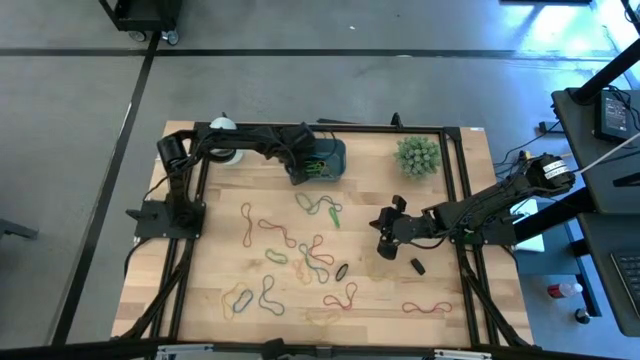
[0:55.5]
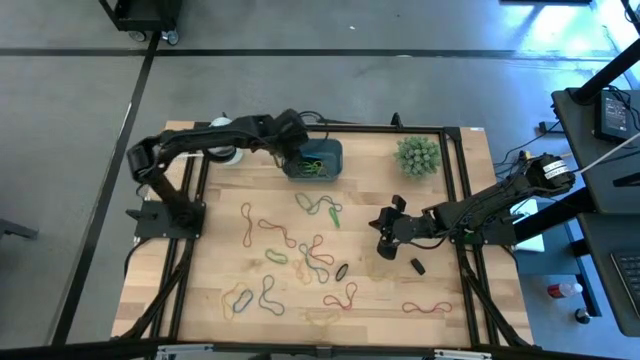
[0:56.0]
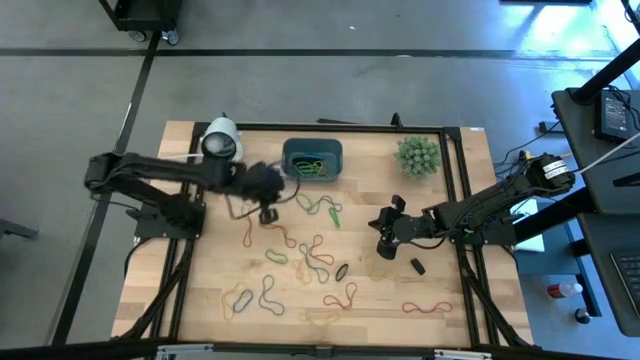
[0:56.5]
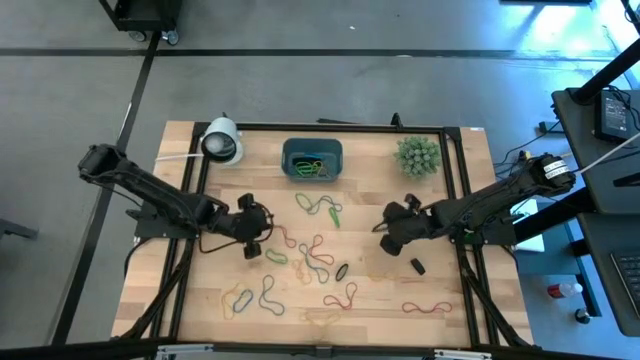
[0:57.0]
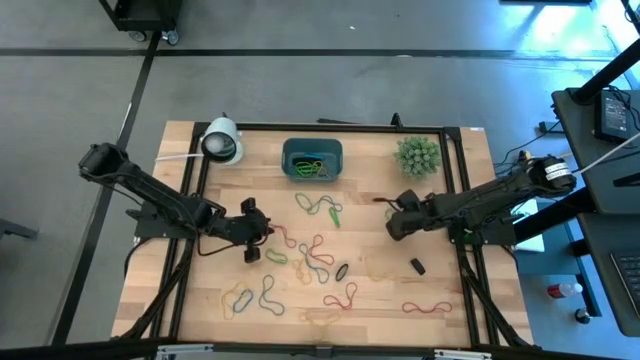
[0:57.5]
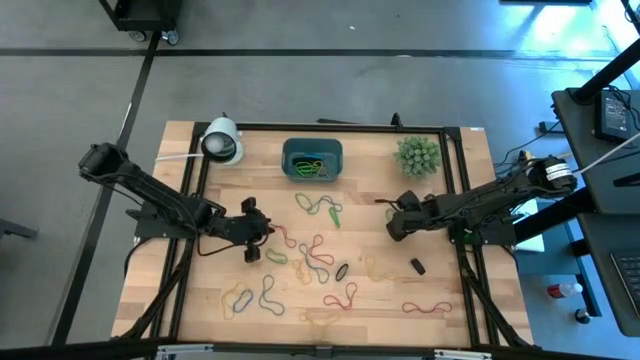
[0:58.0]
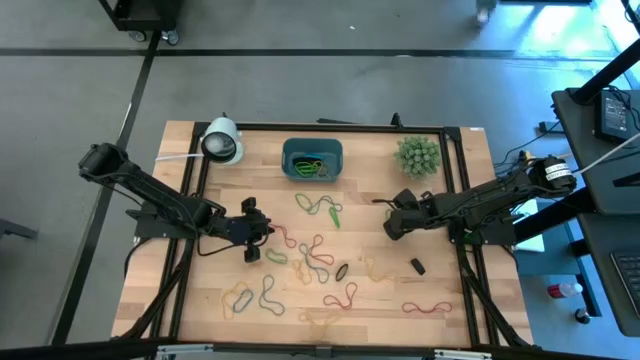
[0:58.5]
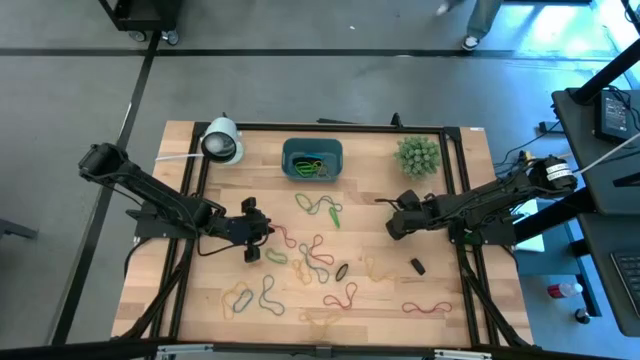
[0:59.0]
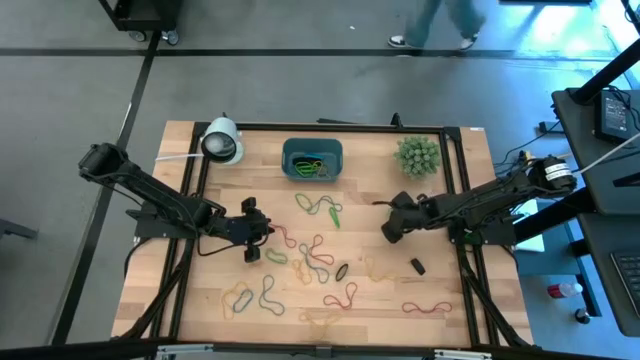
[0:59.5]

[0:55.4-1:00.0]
Task: Pick and place rubber bands into bin
Put the green rubber band into the blue bin

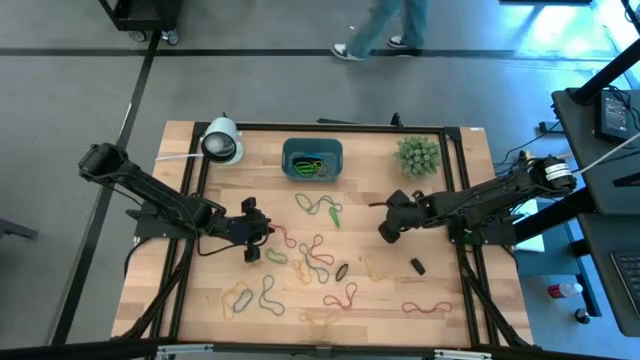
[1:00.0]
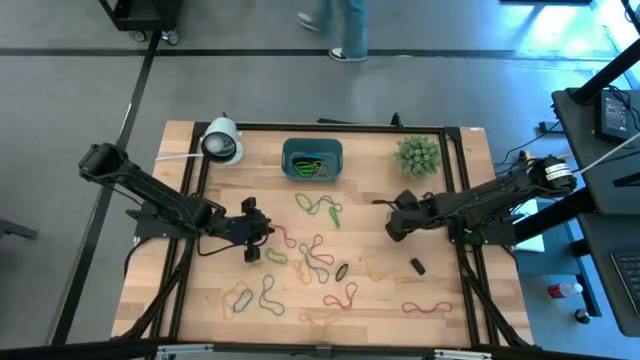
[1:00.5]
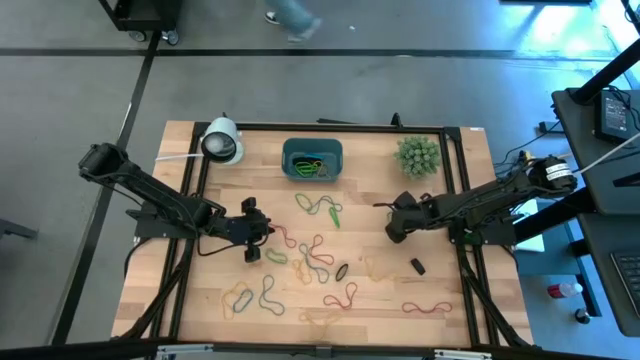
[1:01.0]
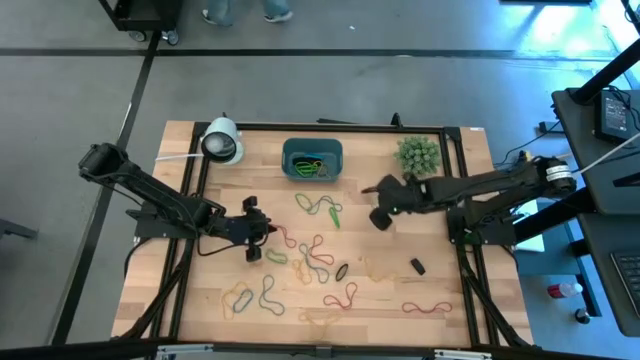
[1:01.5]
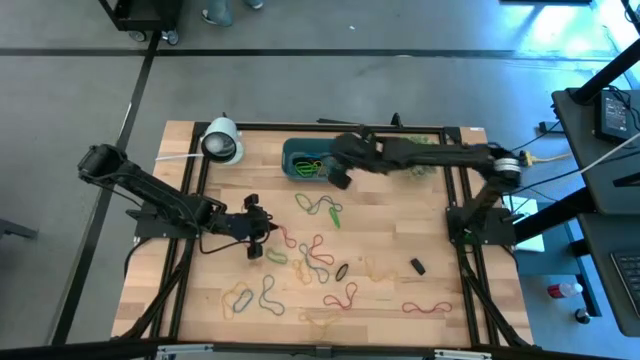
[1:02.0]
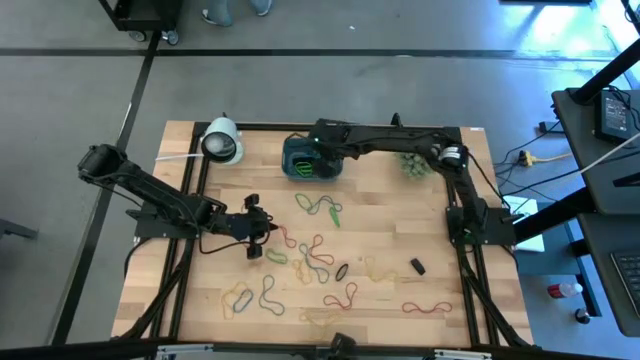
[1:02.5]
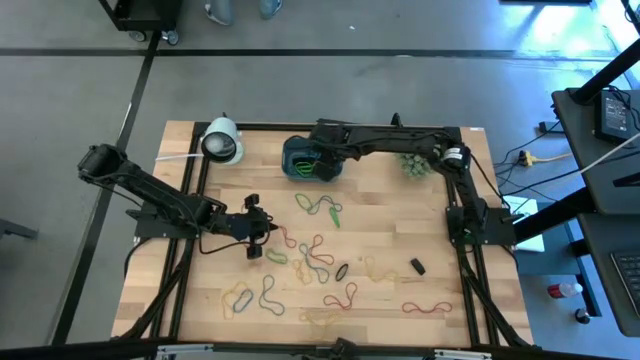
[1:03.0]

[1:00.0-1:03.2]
Put the green rubber band into the blue bin

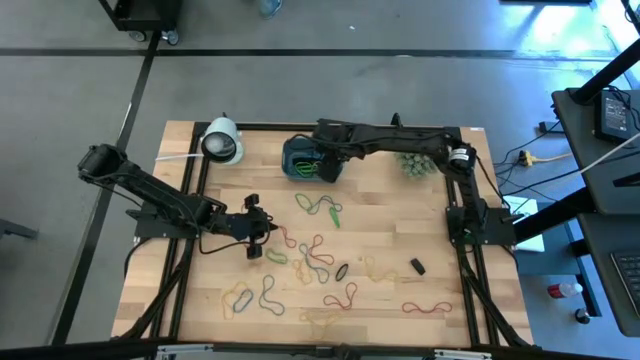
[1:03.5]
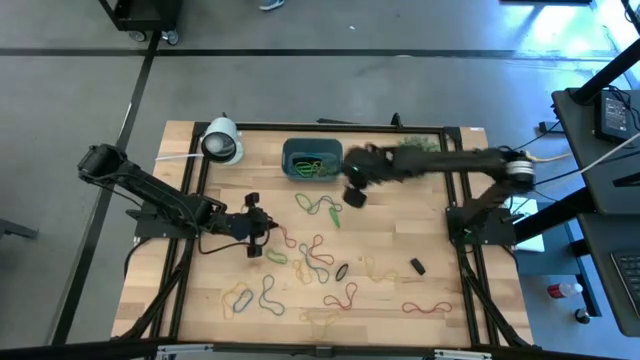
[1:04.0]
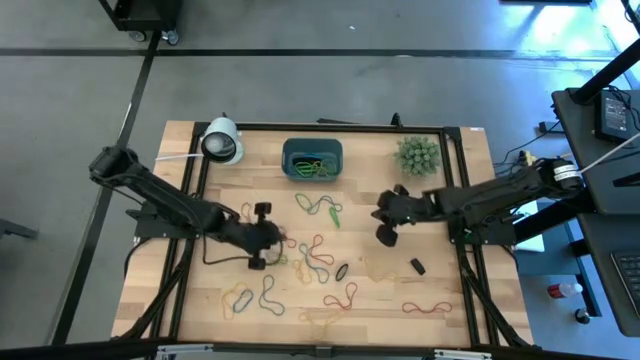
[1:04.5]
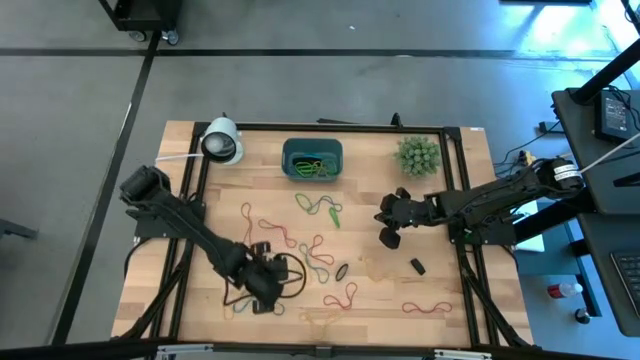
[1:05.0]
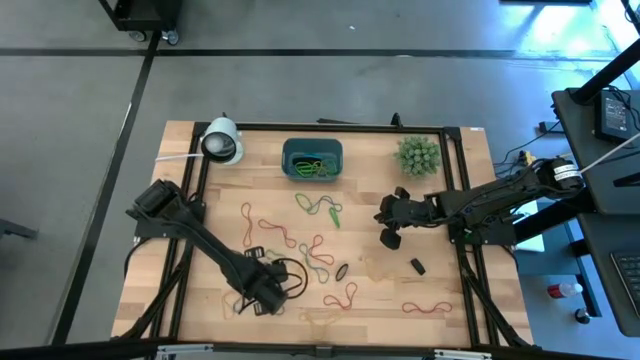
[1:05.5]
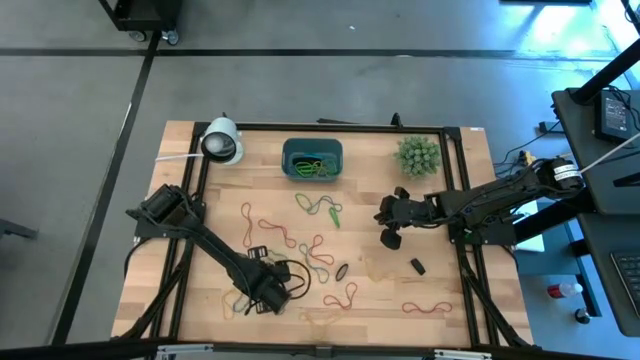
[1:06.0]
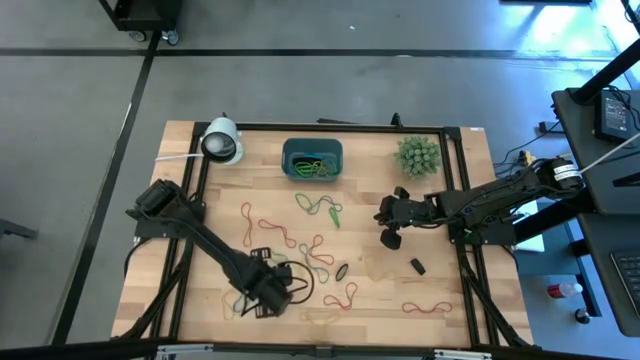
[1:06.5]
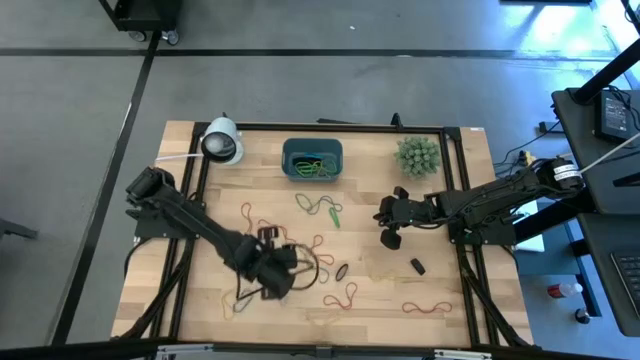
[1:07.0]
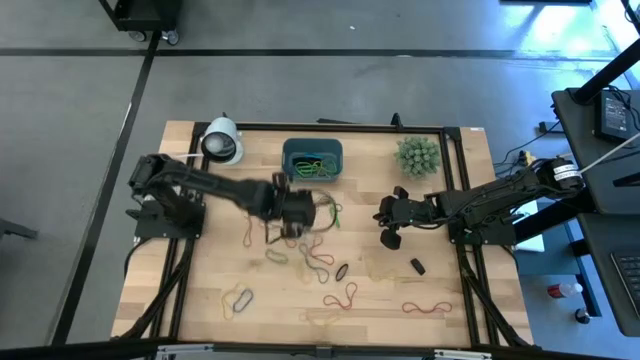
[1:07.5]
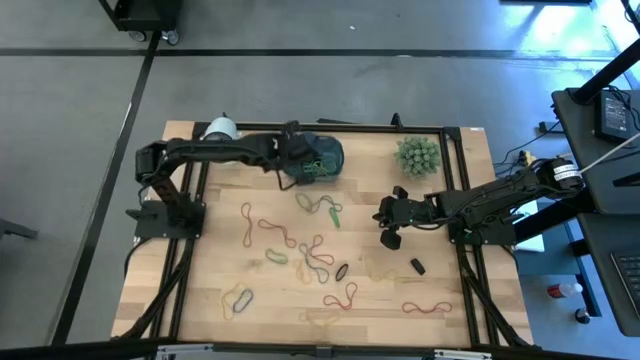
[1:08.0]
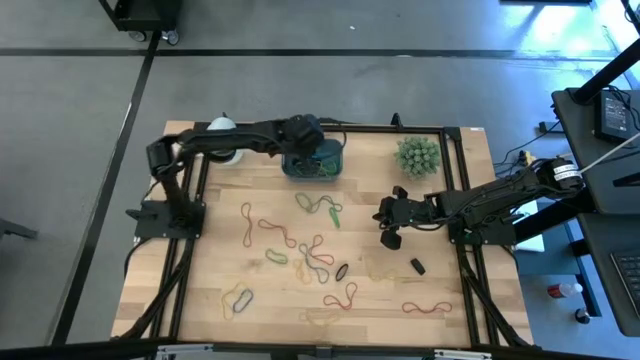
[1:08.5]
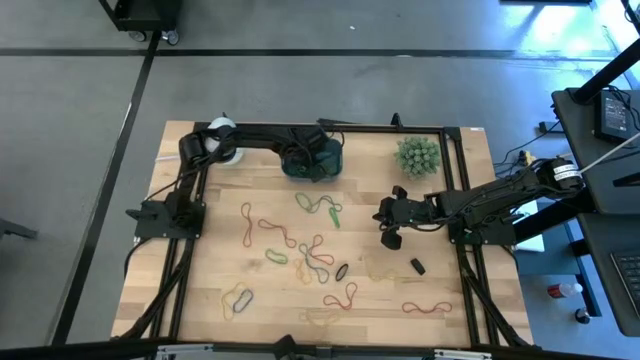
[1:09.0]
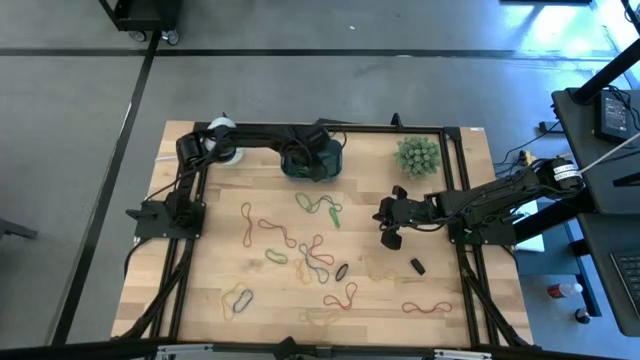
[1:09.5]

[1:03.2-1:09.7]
Put the blue rubber band into the blue bin

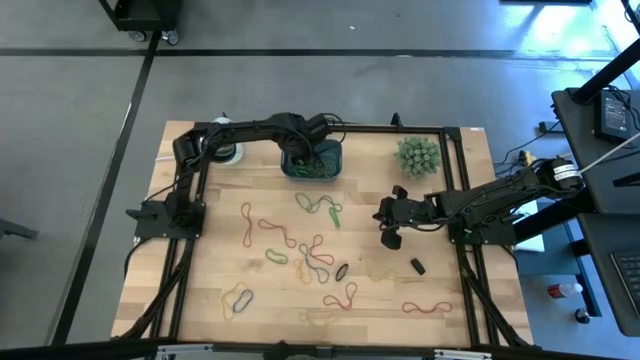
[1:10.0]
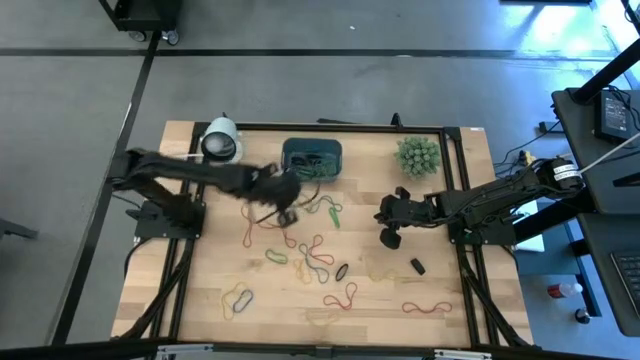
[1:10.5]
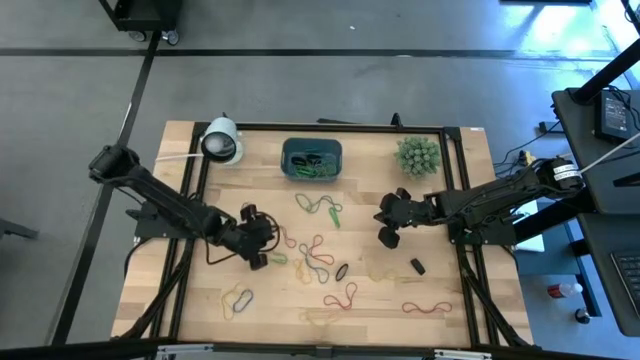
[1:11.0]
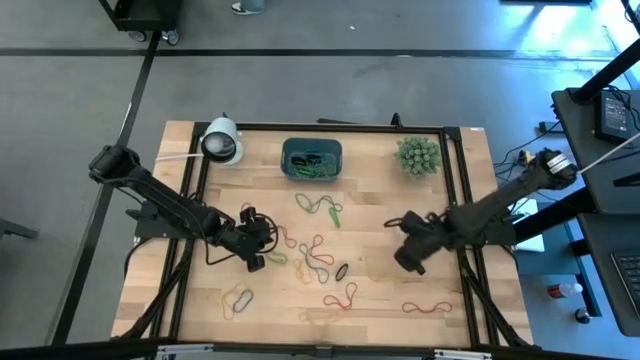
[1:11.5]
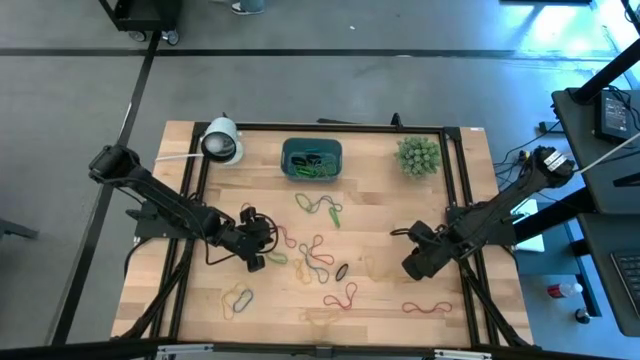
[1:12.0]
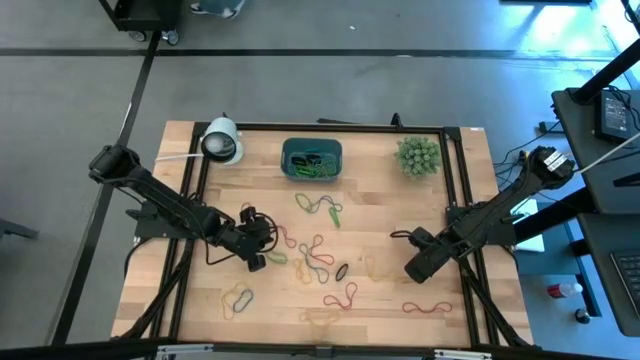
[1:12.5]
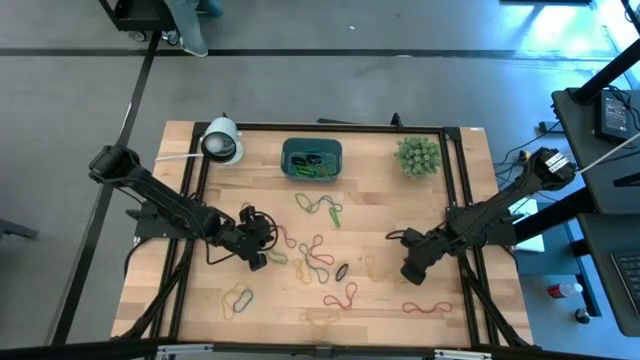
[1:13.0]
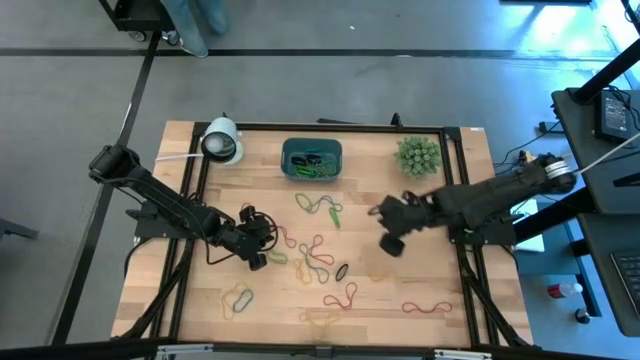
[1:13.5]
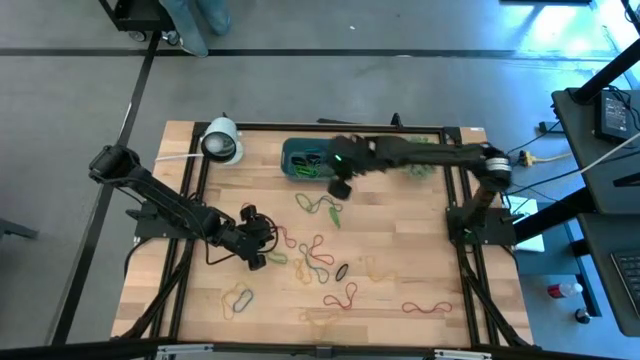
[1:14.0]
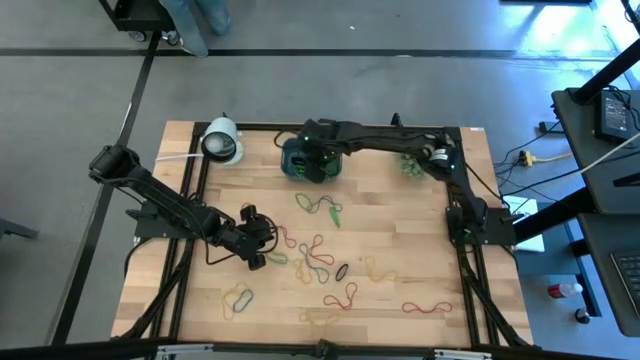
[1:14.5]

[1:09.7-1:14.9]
Put the black rubber band into the blue bin

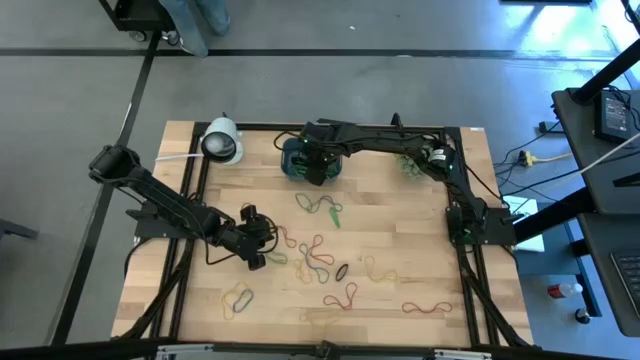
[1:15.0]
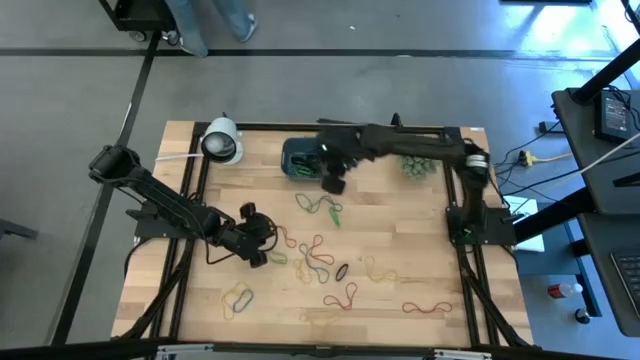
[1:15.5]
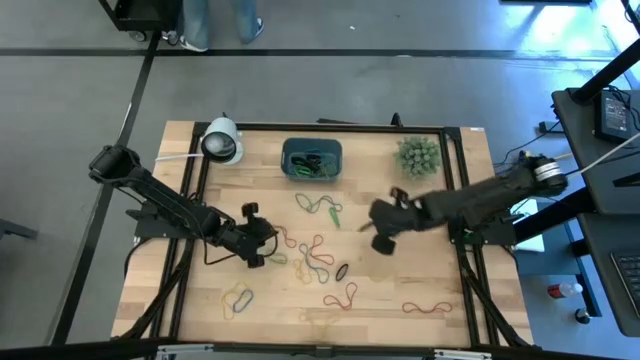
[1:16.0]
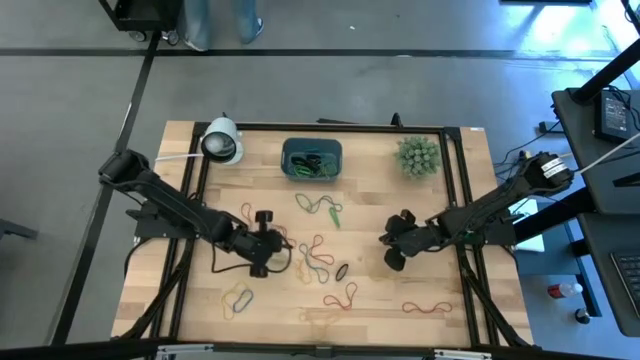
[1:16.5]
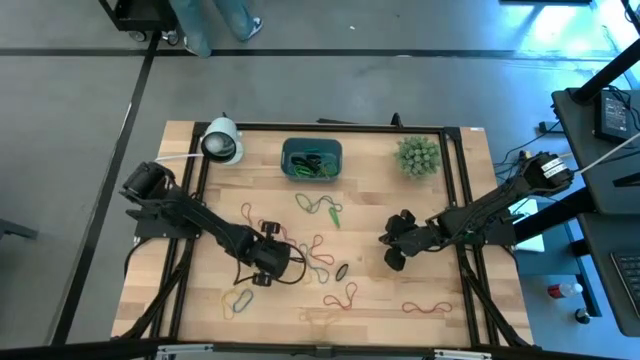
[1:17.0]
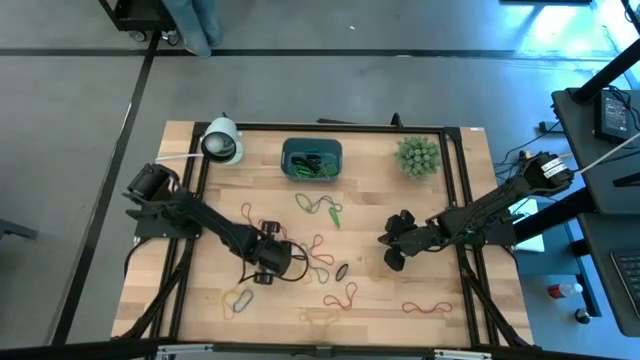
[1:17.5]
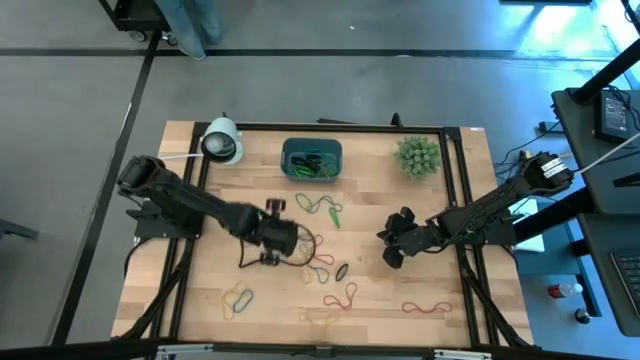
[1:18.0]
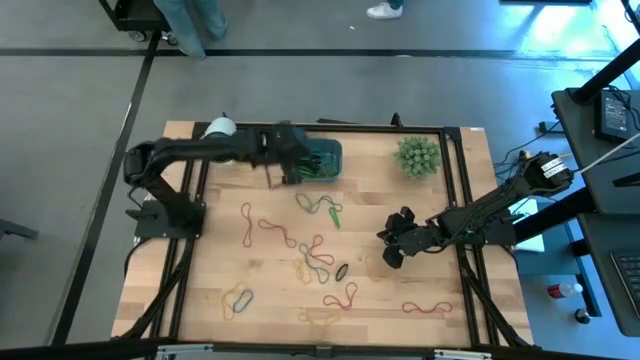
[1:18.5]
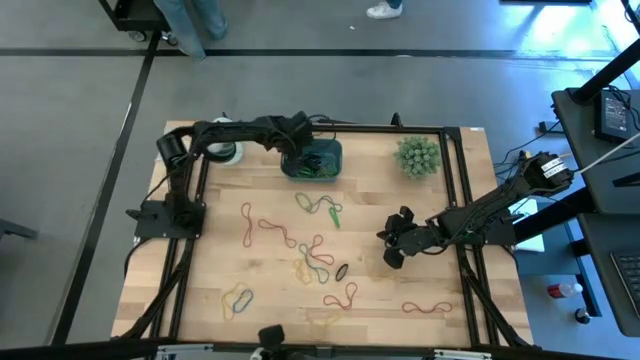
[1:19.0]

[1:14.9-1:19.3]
Put the green rubber band into the blue bin
